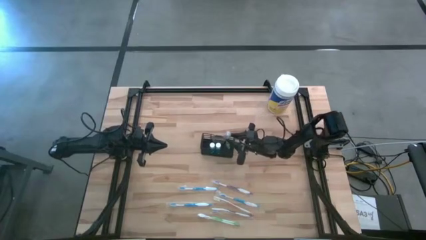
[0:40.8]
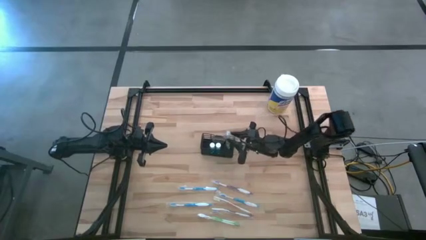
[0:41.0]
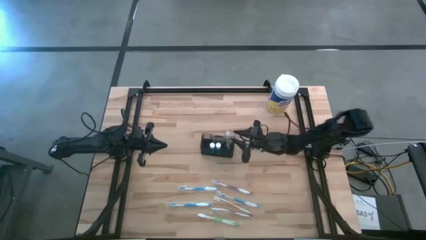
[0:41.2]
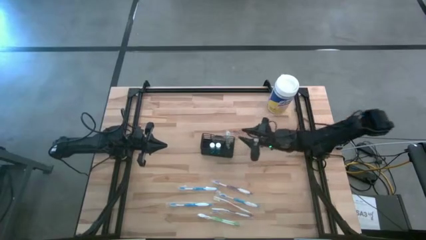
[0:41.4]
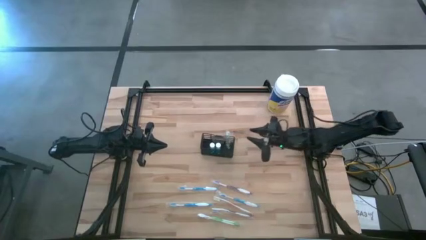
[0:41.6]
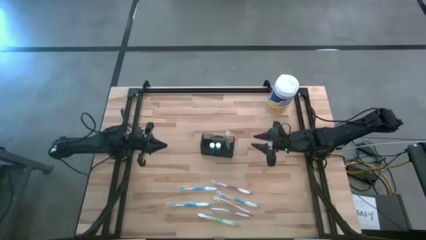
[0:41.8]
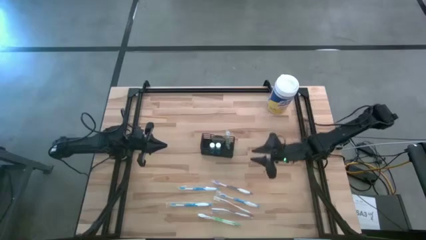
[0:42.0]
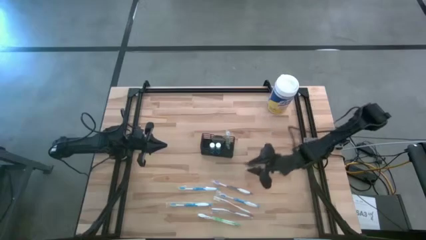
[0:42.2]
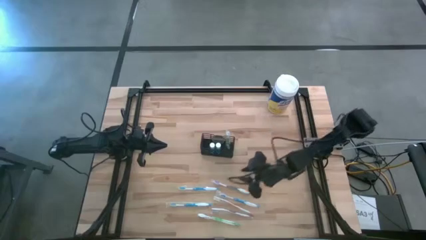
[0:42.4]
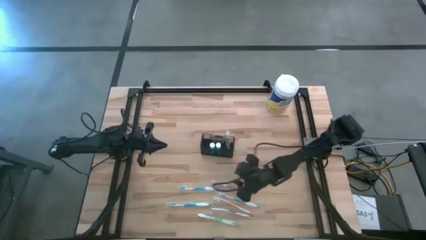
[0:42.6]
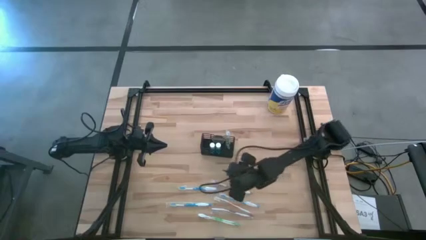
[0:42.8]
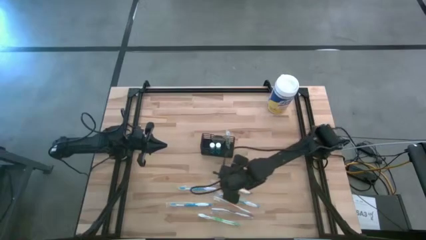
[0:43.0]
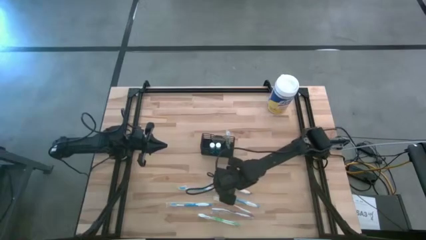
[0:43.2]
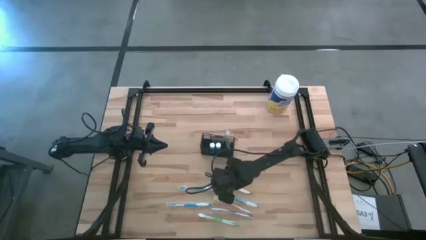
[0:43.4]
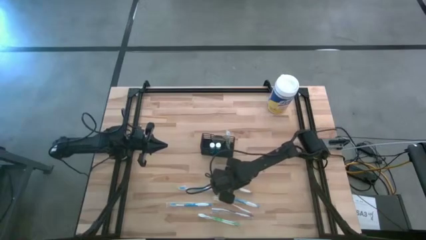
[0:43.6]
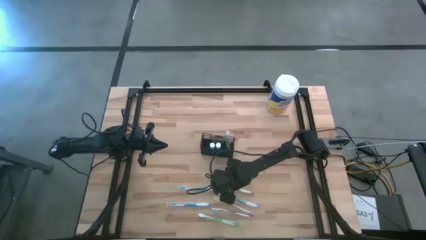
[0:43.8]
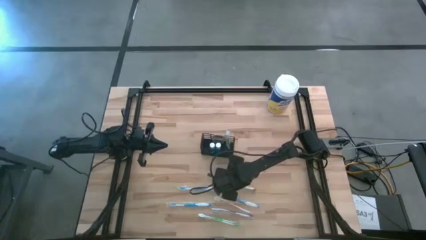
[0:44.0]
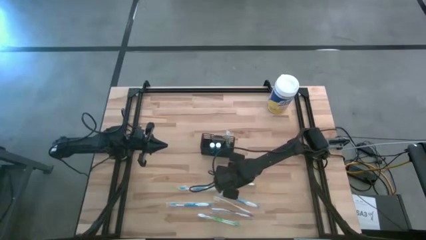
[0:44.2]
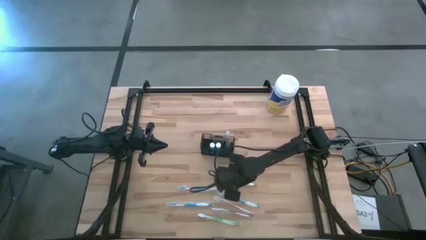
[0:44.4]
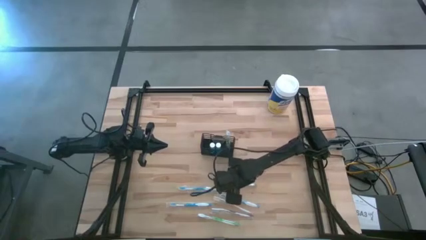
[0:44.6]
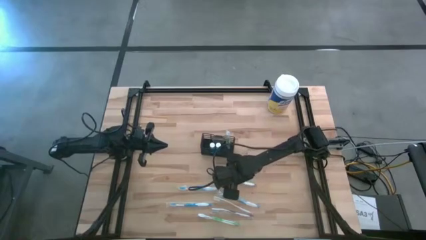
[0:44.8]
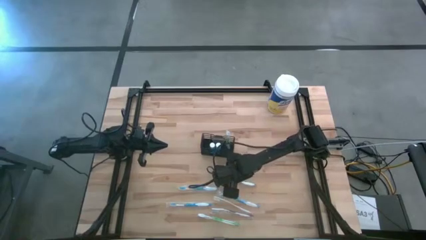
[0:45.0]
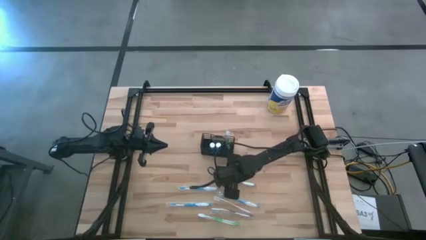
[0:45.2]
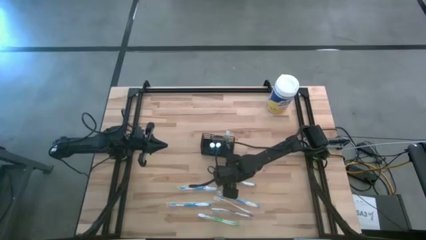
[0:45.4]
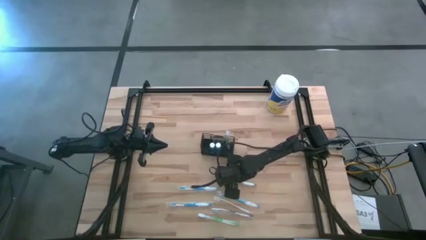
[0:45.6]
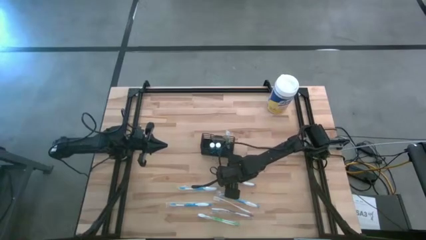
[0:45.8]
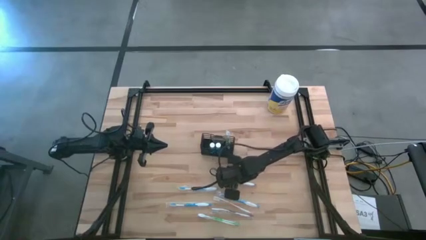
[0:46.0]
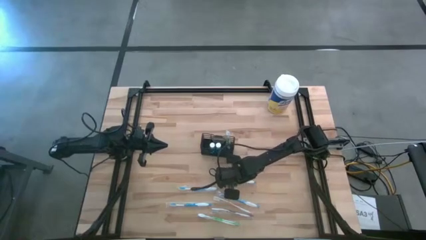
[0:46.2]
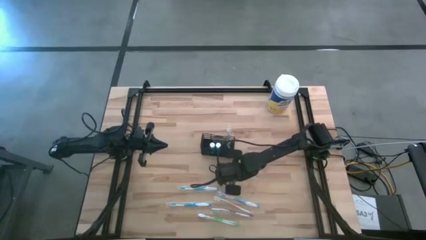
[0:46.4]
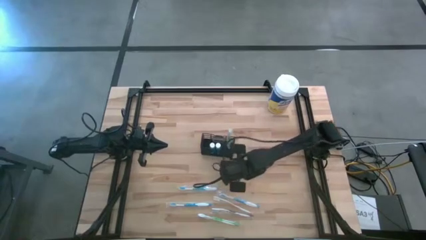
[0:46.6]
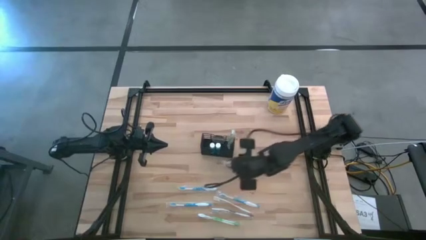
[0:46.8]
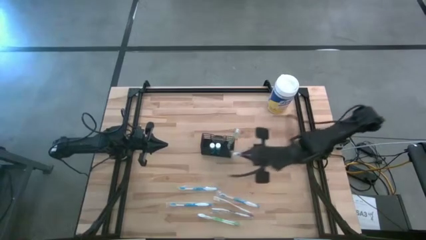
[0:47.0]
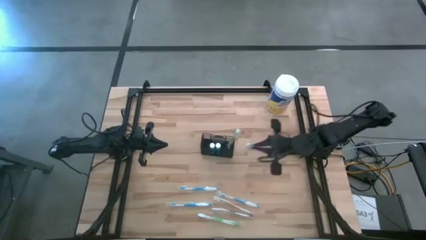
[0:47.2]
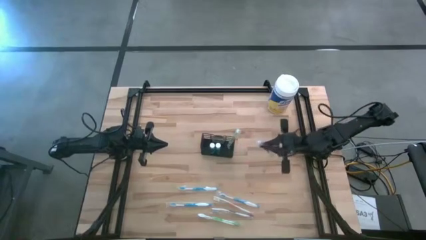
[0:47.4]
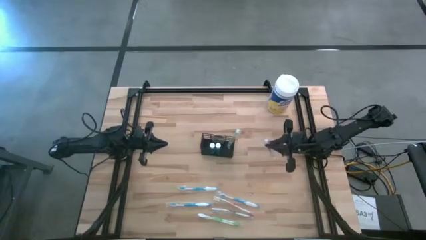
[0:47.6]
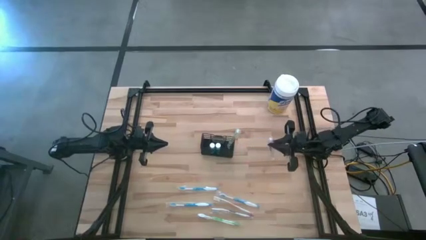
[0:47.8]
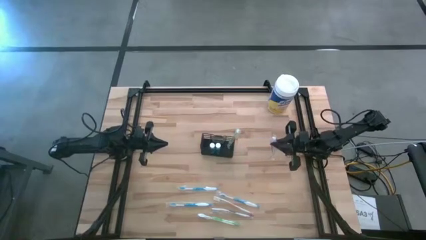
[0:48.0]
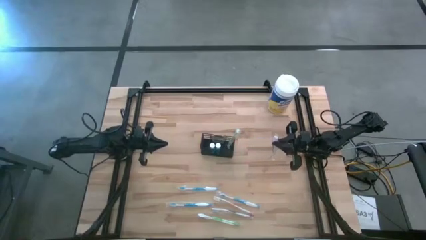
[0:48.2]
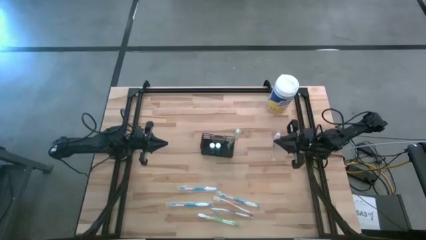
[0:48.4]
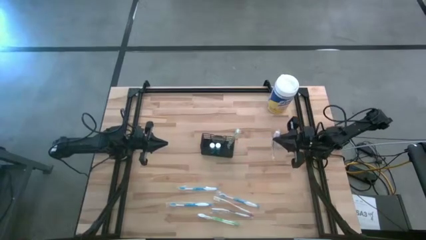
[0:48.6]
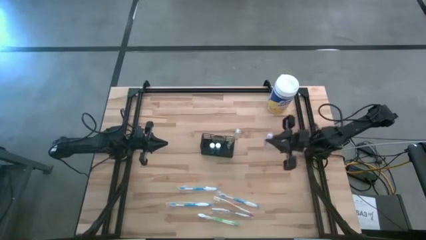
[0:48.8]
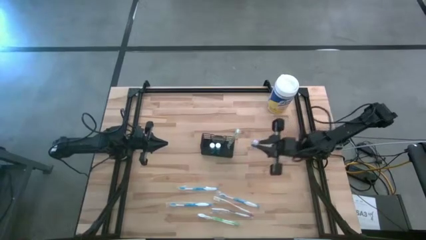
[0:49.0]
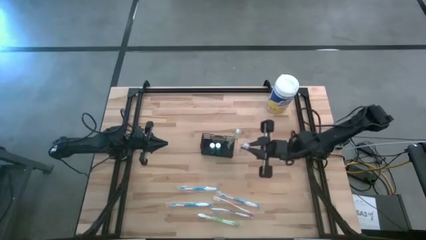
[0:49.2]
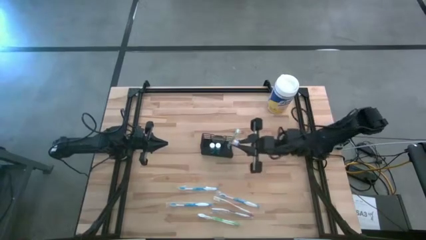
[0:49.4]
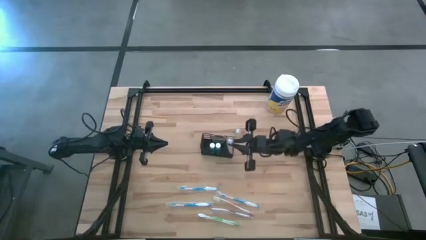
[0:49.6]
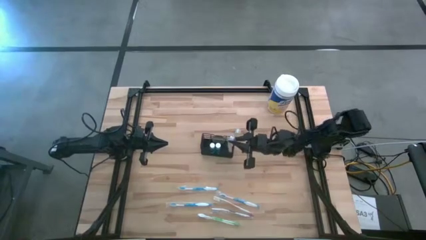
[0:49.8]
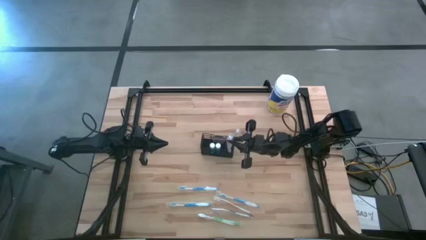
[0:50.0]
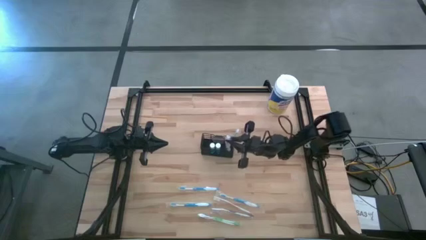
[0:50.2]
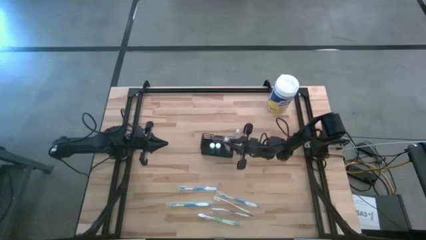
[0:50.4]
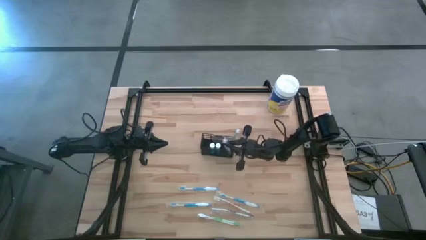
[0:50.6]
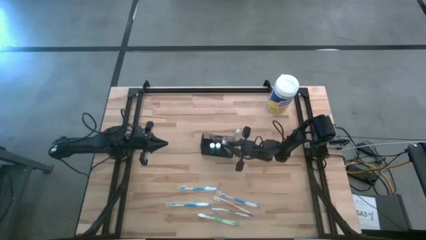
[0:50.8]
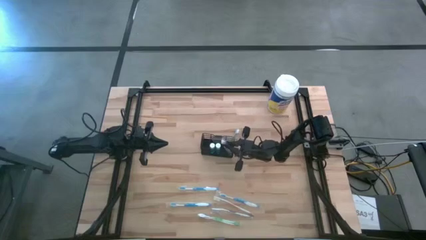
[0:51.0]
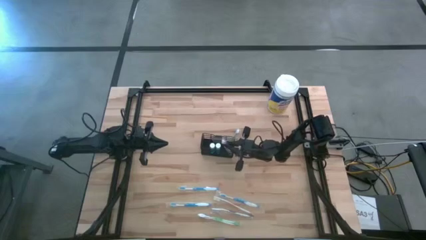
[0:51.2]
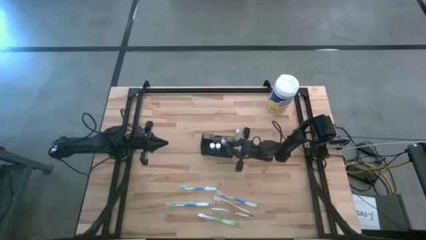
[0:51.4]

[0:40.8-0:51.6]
Task: Pick & Place toothbrushing station
Put the top violet toothbrush into the wire organizer

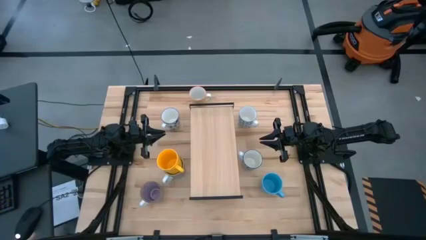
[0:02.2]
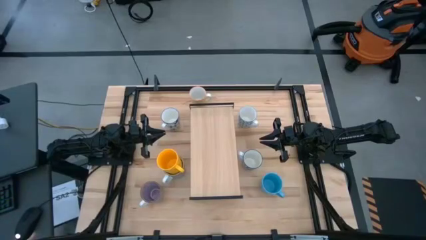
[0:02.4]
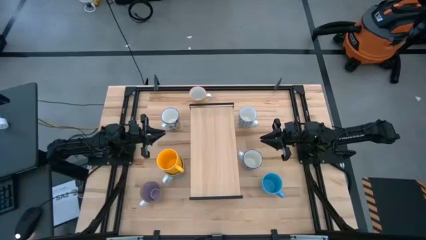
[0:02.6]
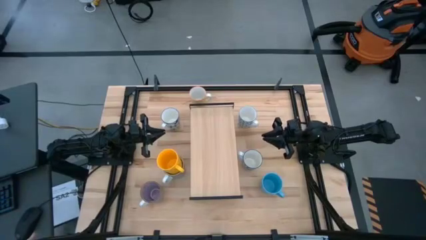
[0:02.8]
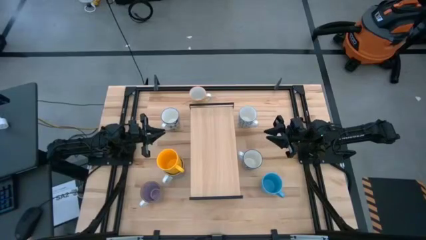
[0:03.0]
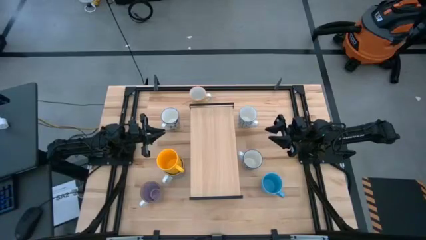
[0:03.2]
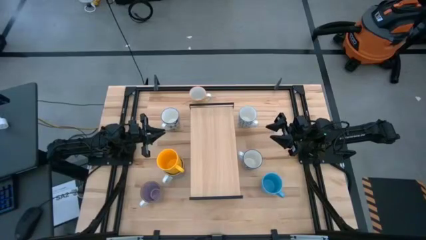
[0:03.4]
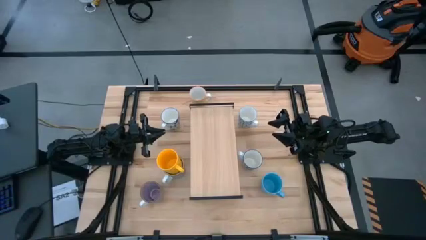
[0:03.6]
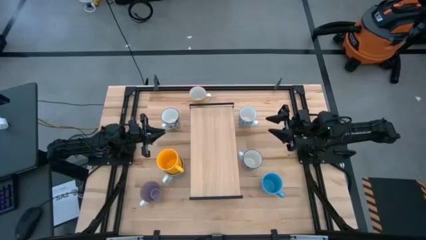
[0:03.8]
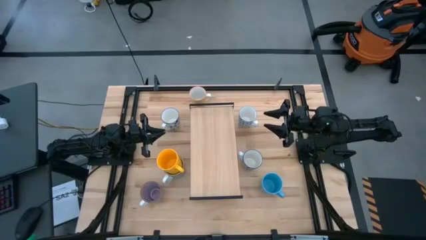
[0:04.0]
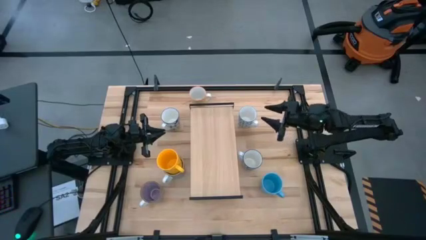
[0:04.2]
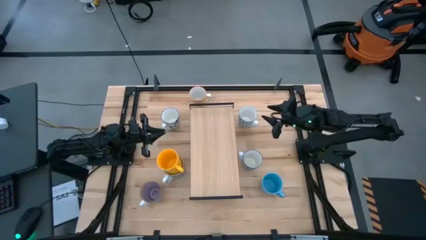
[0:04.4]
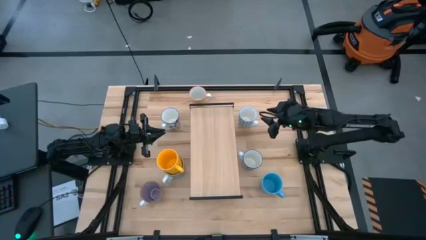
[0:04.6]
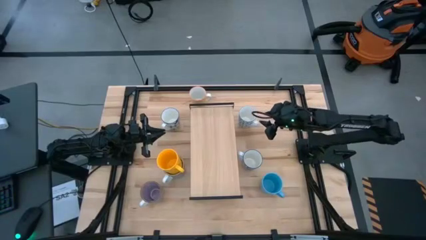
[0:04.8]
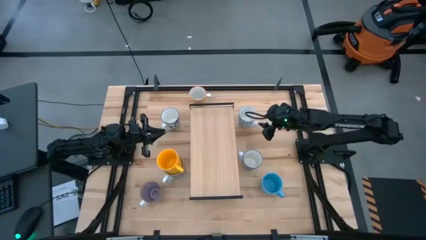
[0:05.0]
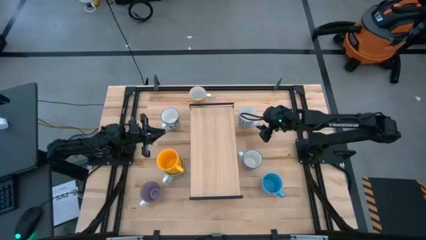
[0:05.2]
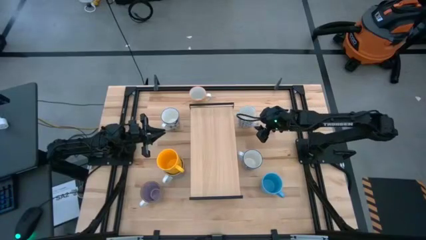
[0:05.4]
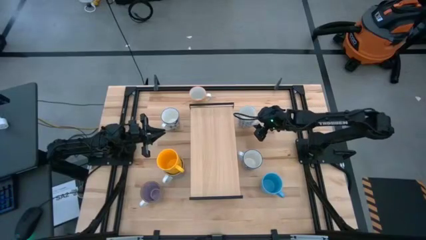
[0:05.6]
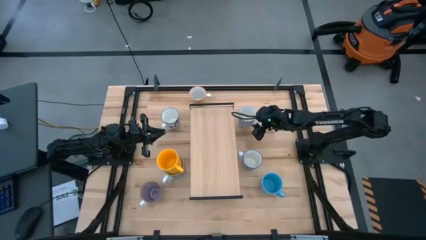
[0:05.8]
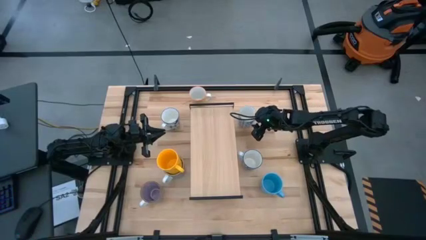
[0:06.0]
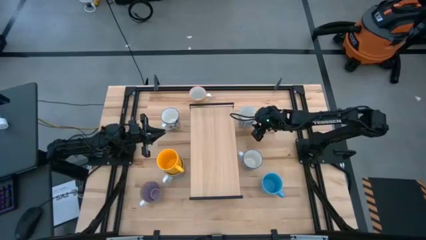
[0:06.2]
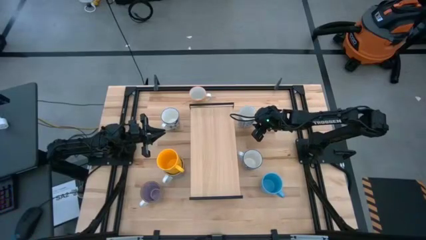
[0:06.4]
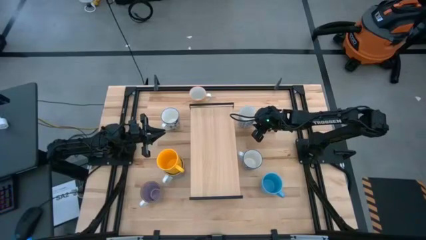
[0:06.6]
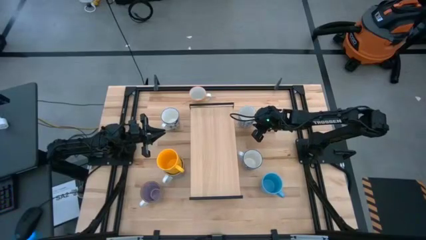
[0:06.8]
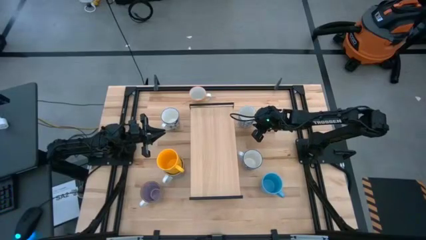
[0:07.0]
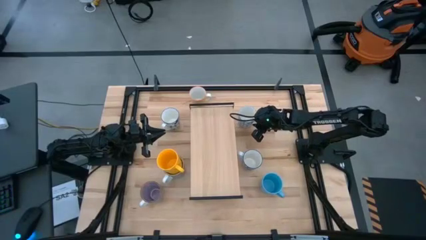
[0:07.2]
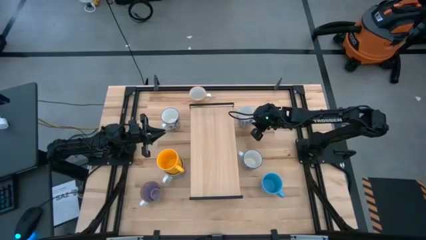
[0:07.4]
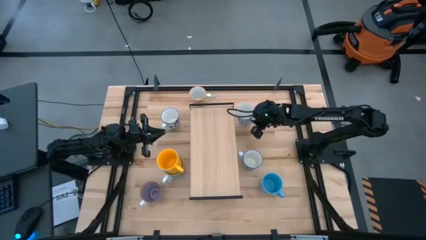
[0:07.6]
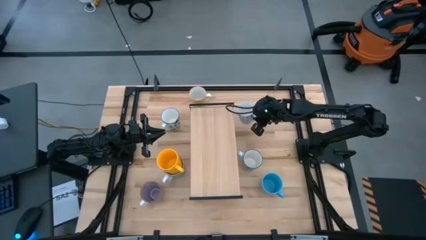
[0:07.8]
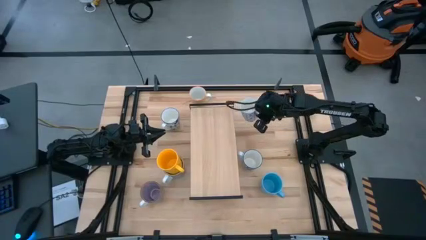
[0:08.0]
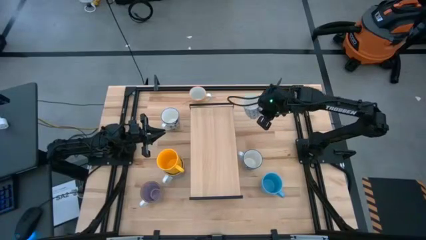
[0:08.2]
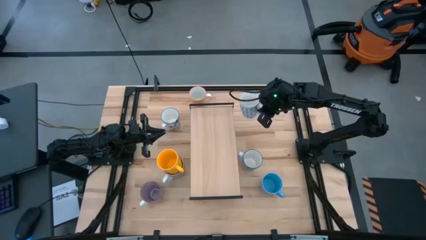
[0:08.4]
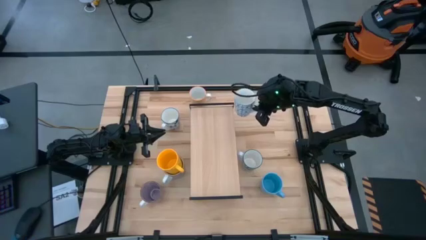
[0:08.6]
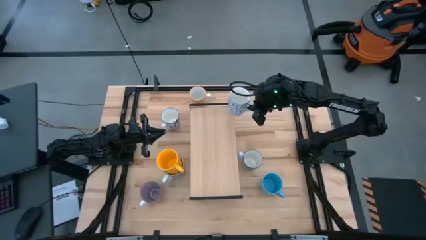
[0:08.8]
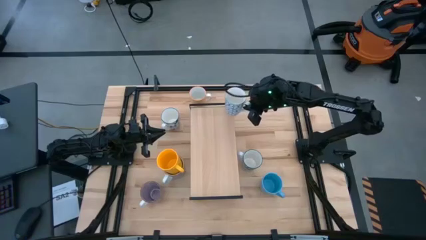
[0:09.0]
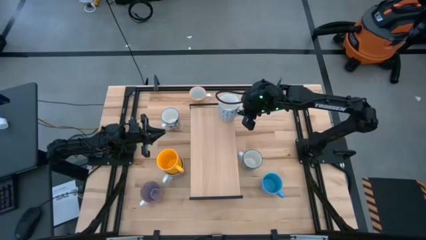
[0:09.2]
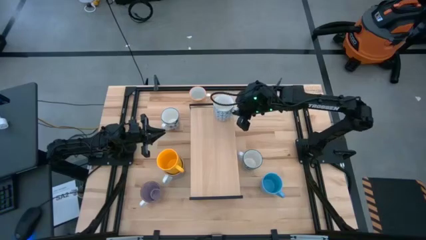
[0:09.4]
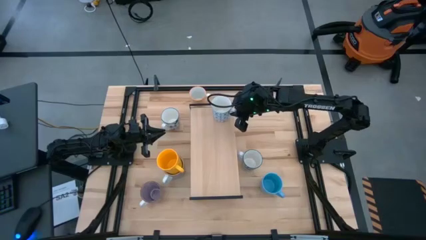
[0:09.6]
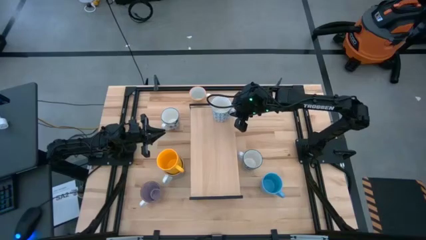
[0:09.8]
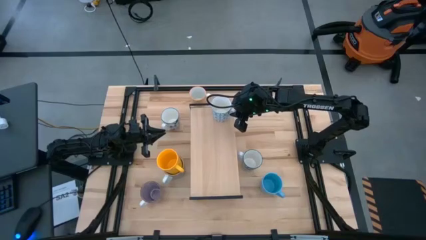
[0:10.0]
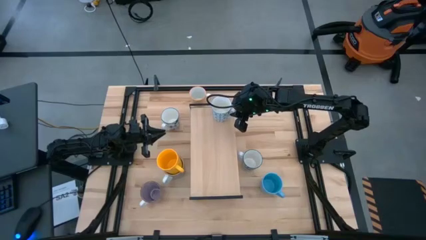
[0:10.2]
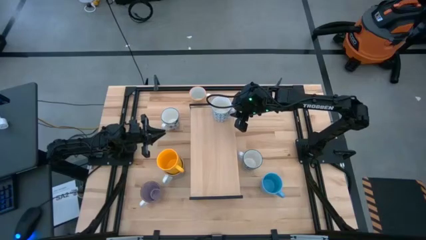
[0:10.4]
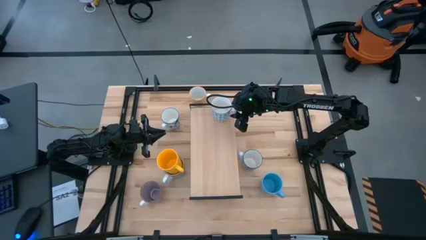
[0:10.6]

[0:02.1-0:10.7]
Task: Place coffee mugs
Put the white and green mug on the shelf
